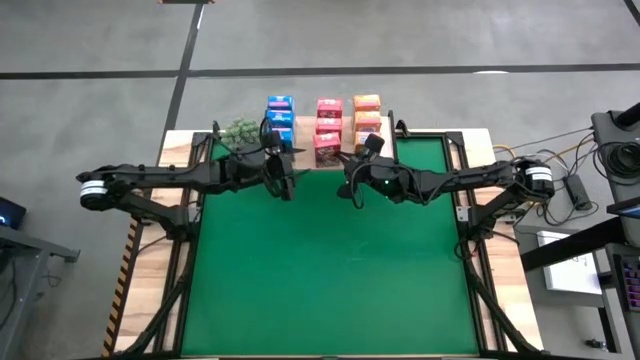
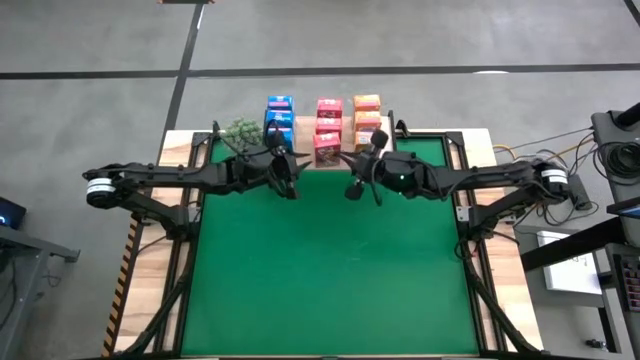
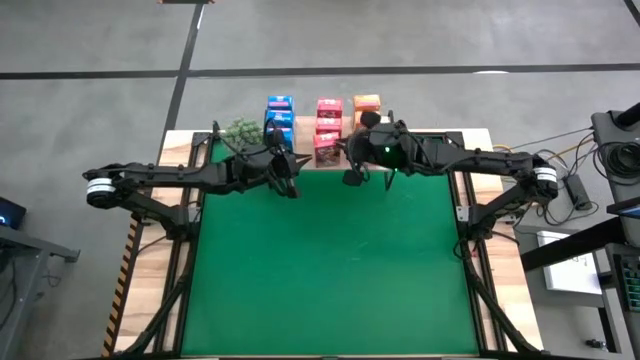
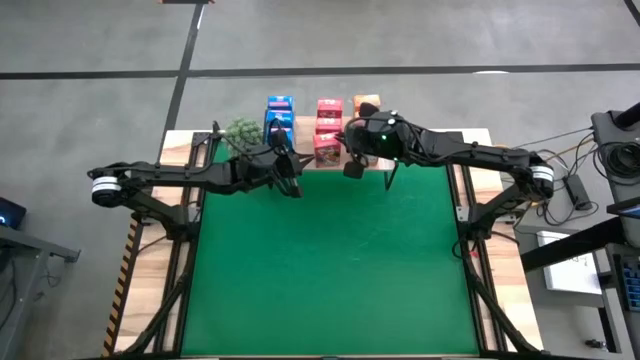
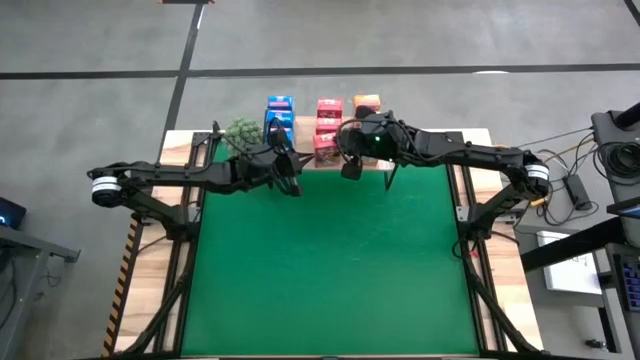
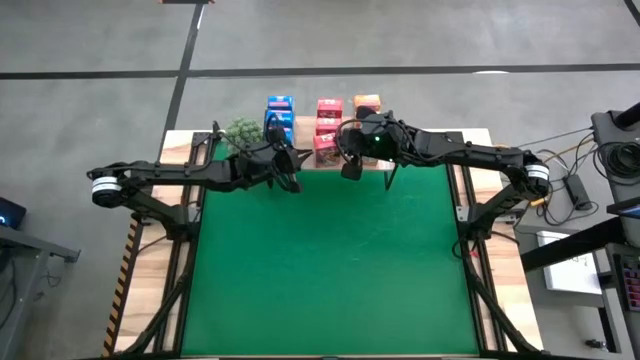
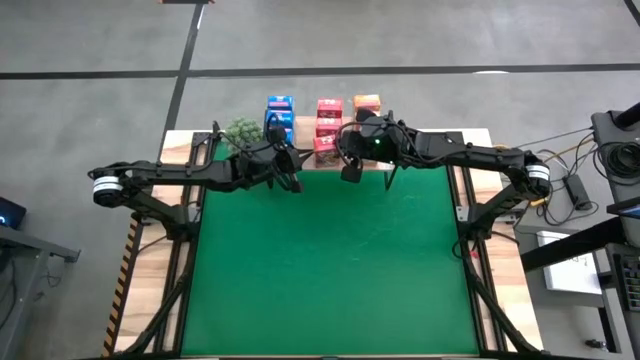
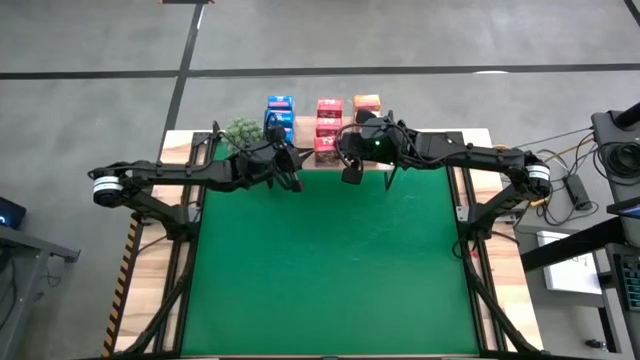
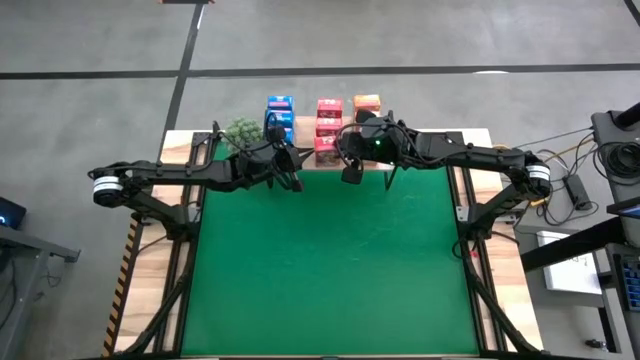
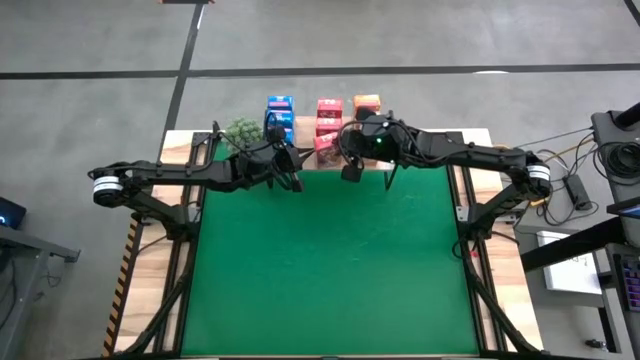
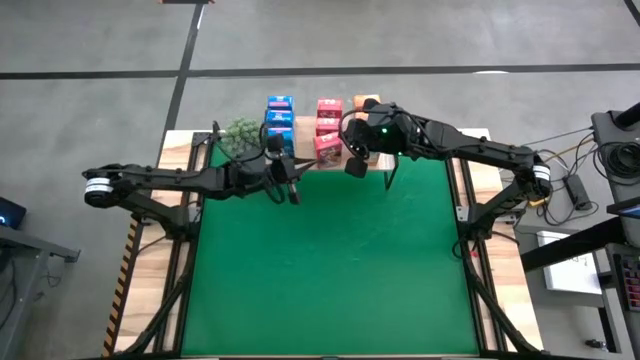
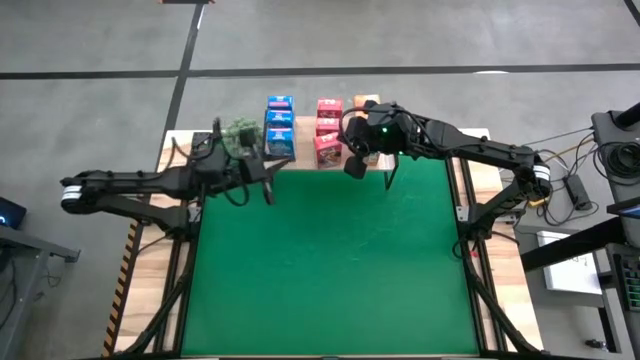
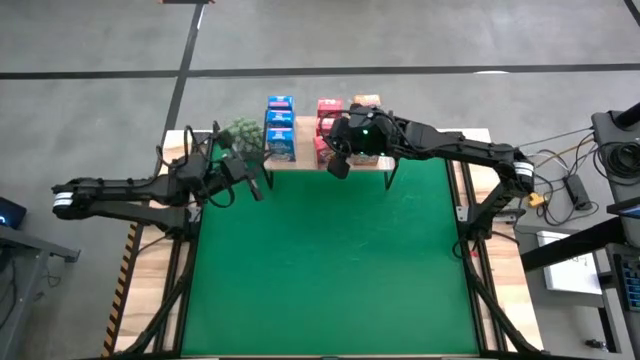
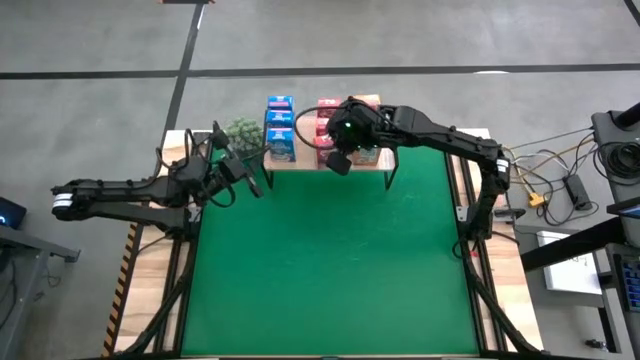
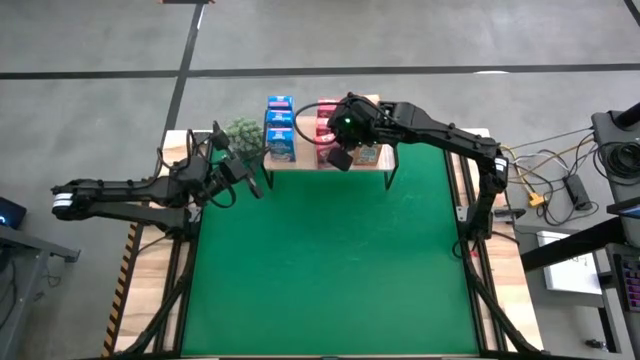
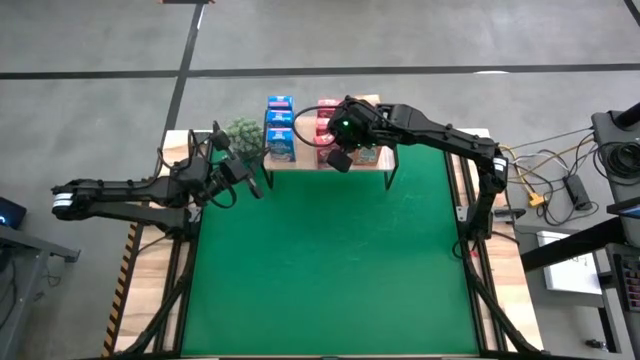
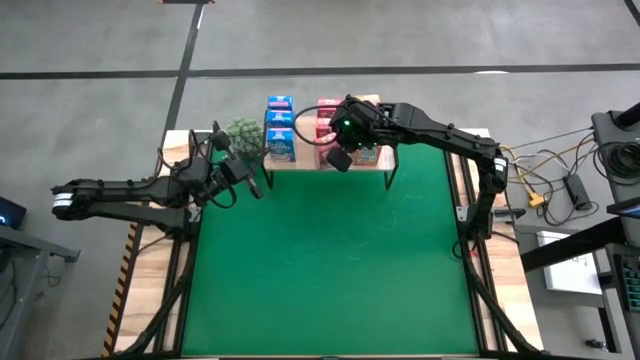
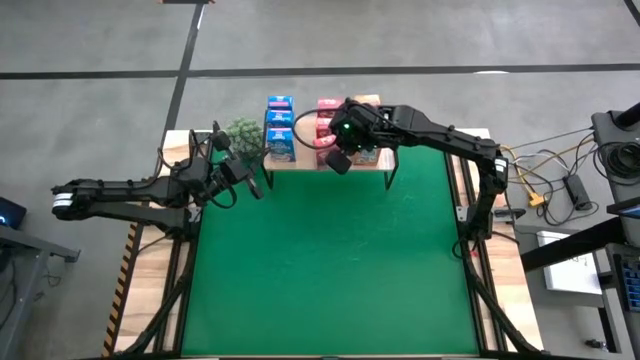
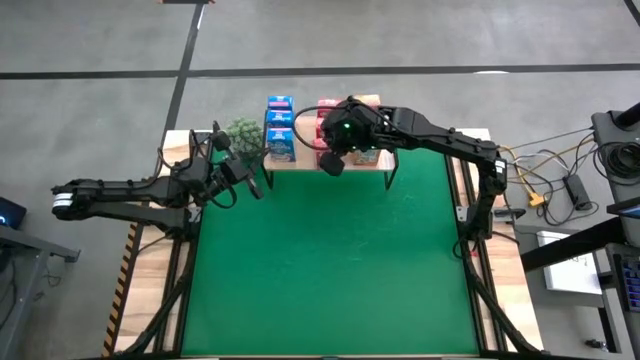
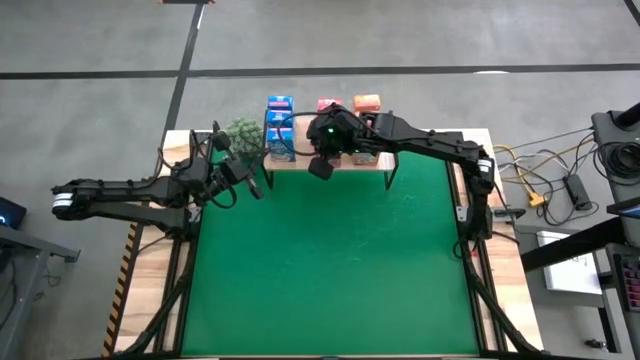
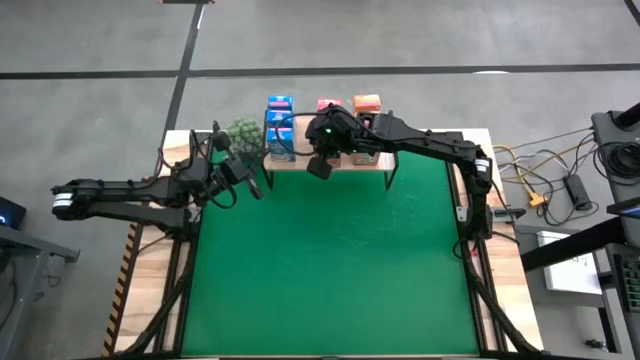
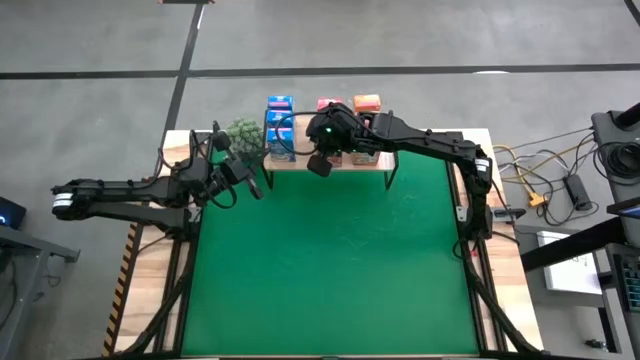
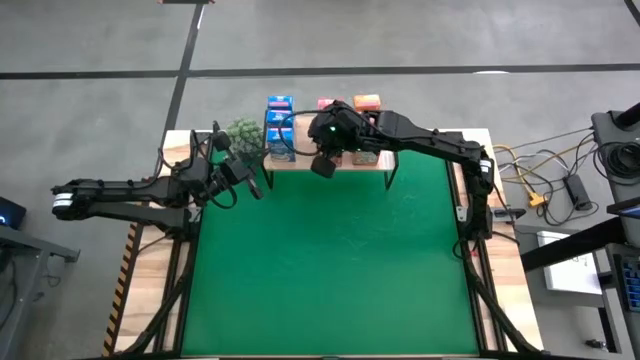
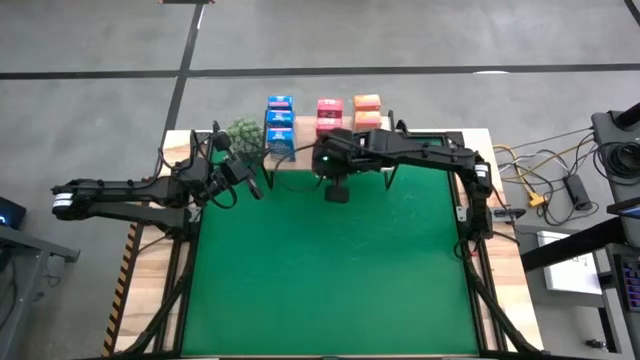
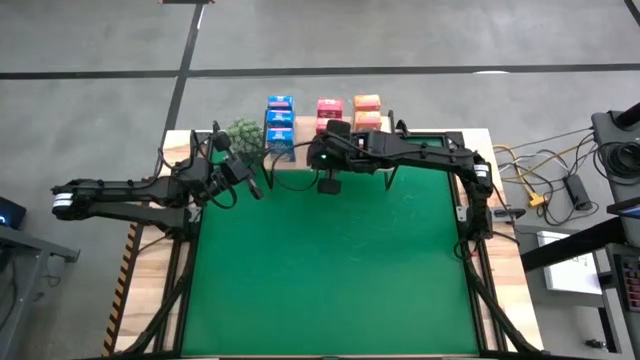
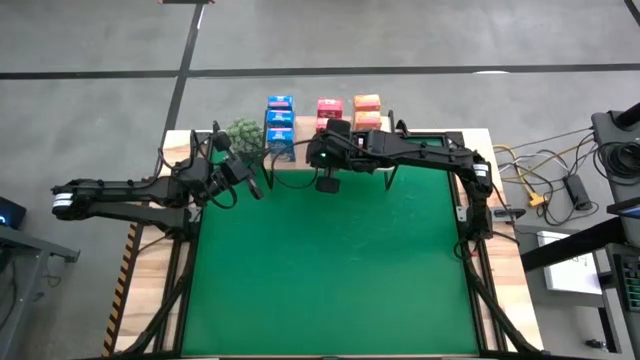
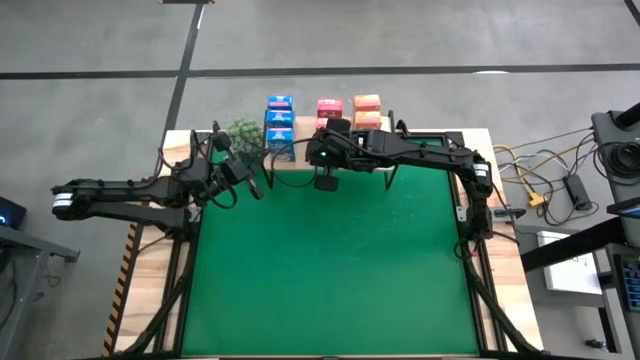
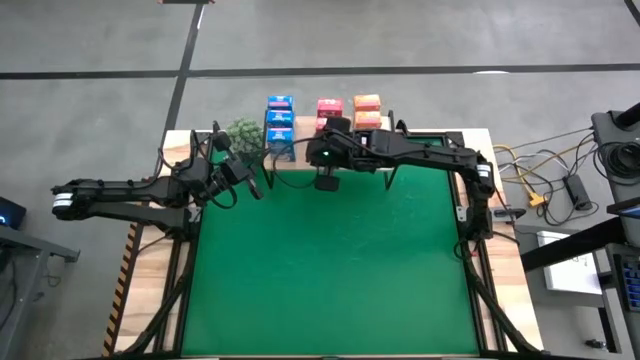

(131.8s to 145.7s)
Task: Stack cereal on shelf
Put the red cereal box on the shelf aligned with the other red cereal boxes

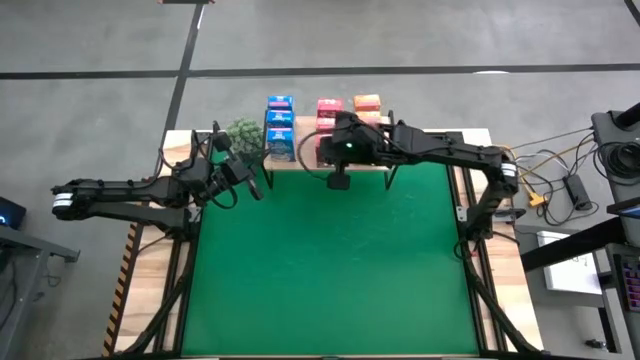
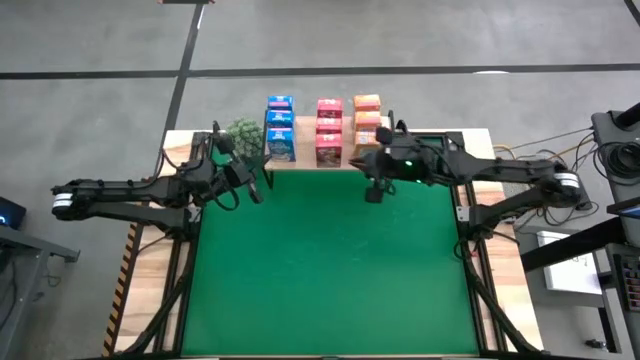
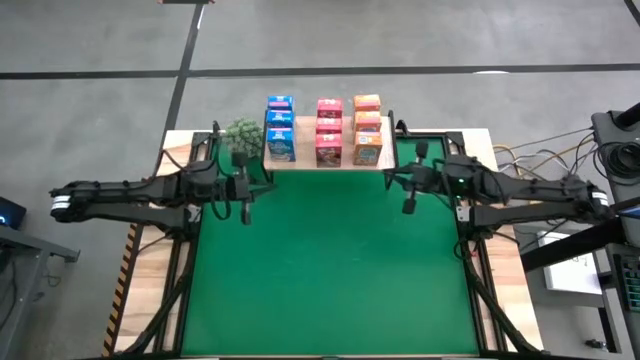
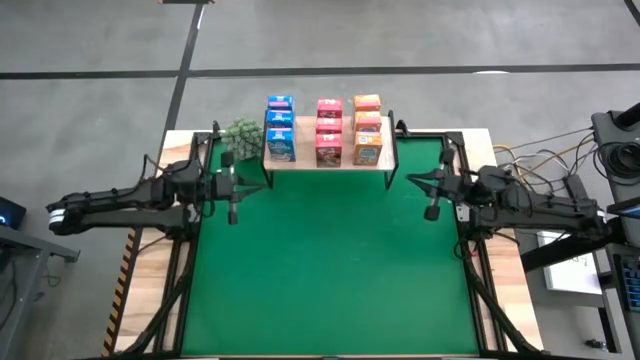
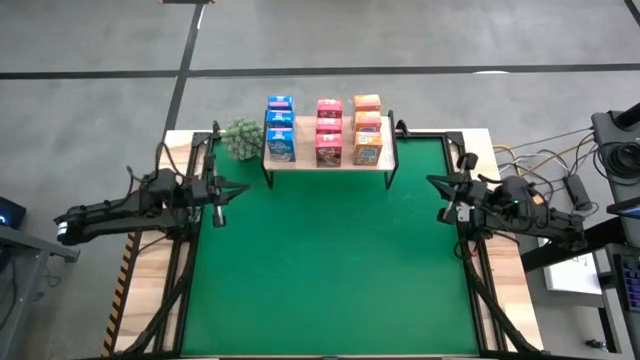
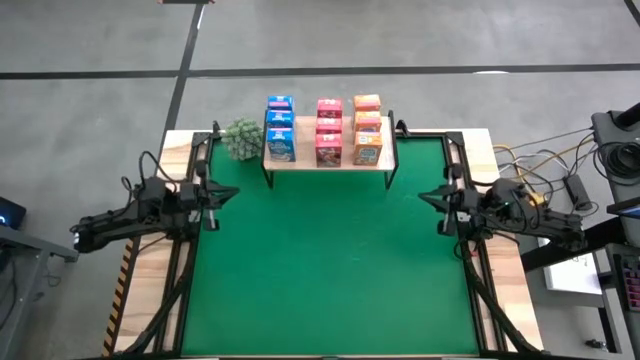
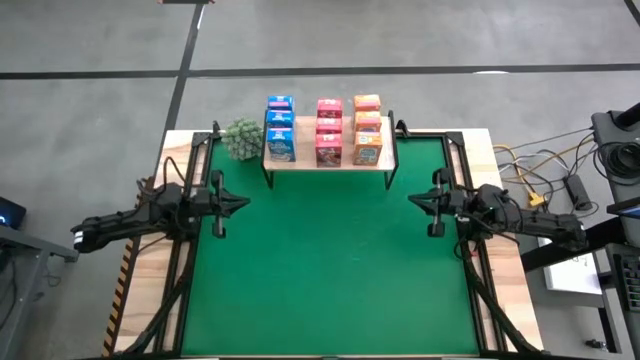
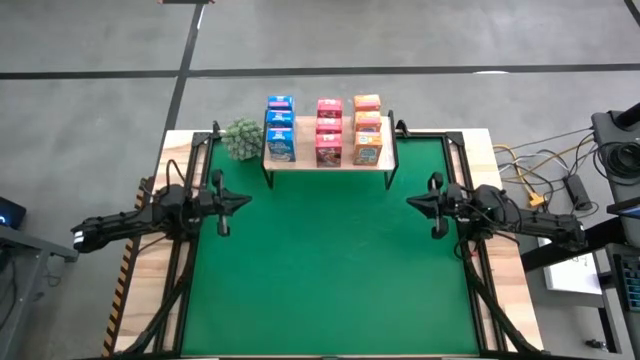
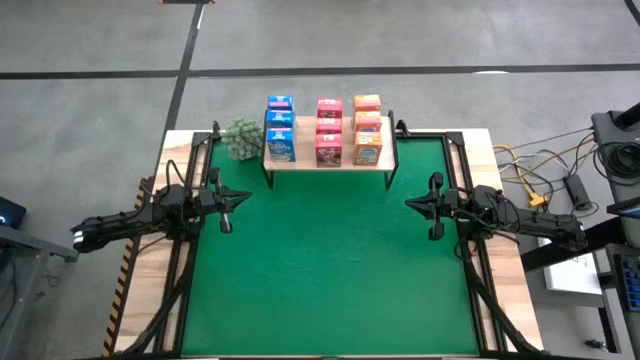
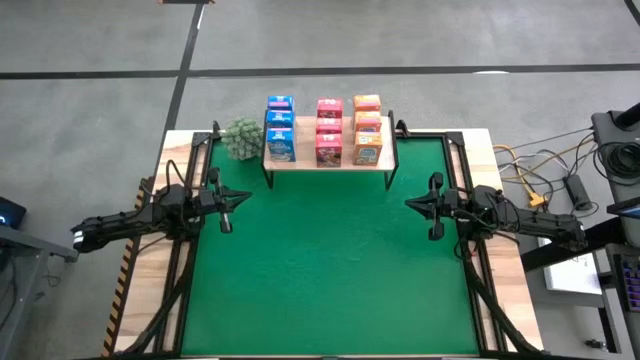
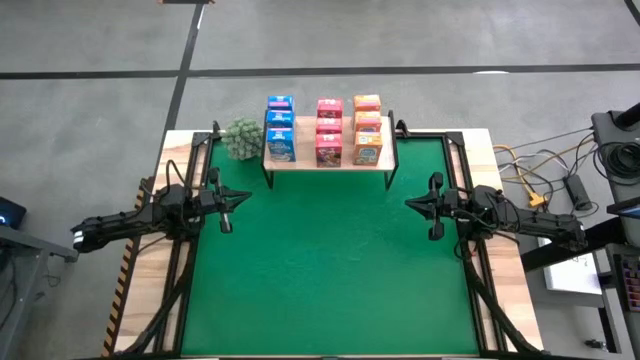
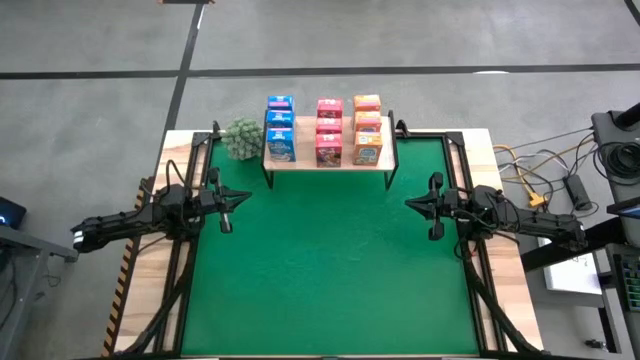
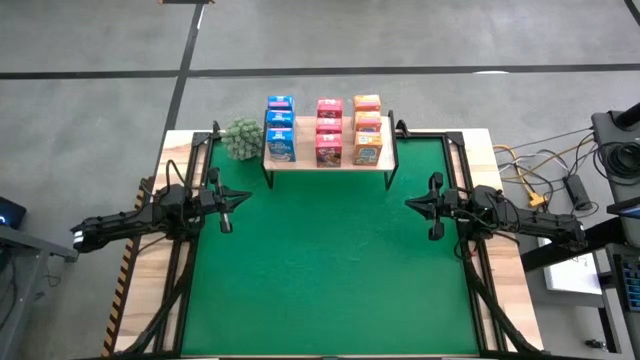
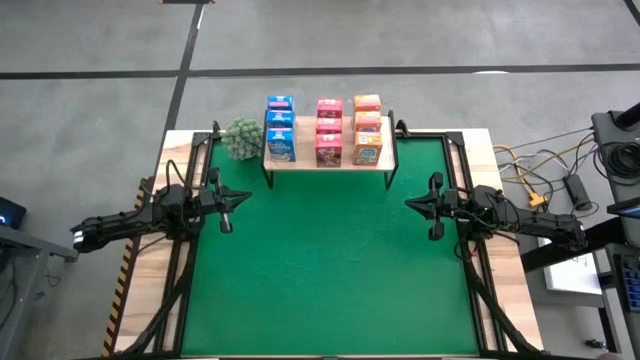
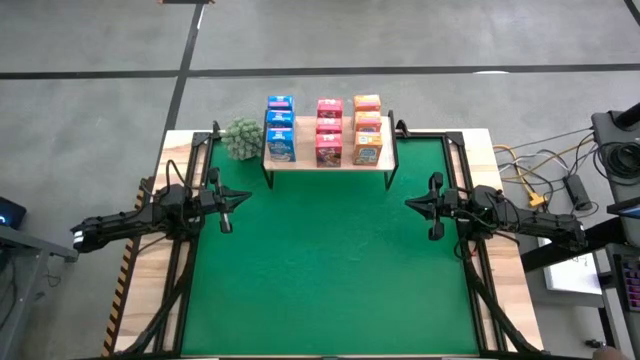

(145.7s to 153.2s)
Return to Home Position

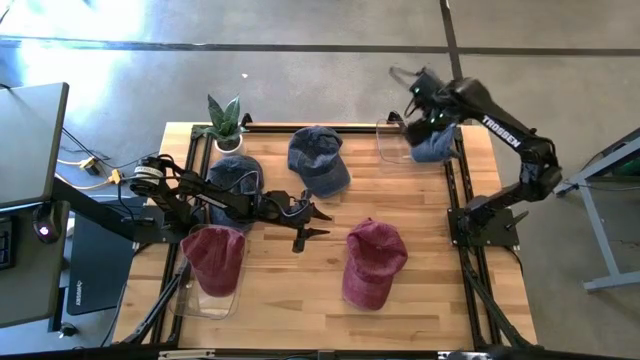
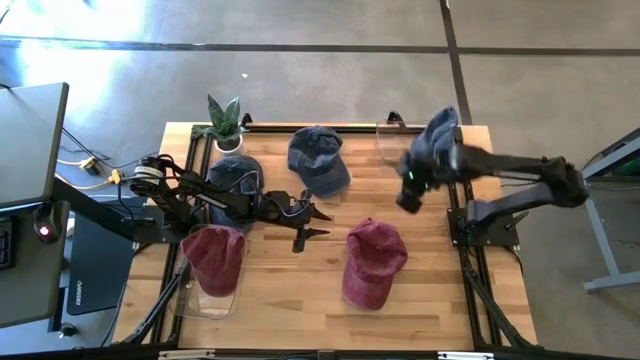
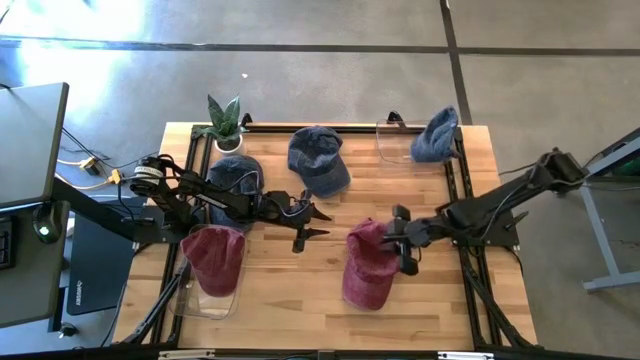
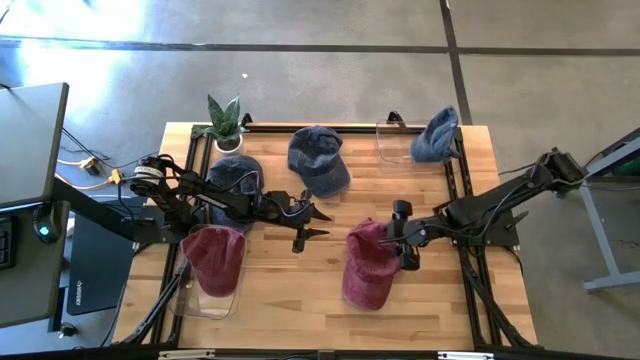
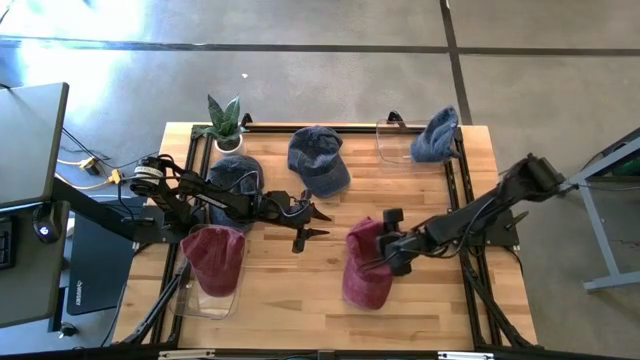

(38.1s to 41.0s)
Task: Pick & Place hat
Put the red cap into the bottom transparent bin
